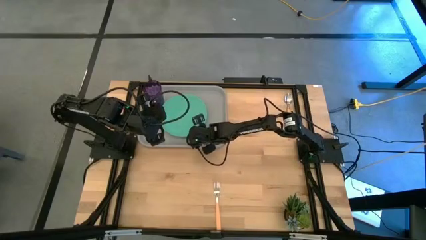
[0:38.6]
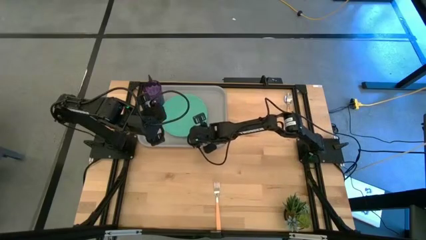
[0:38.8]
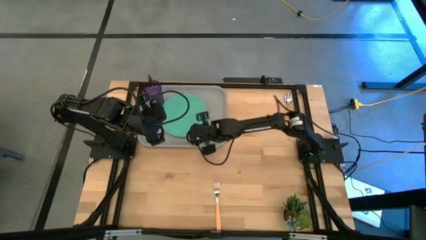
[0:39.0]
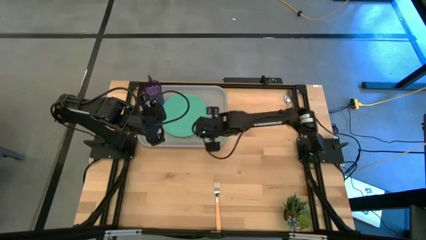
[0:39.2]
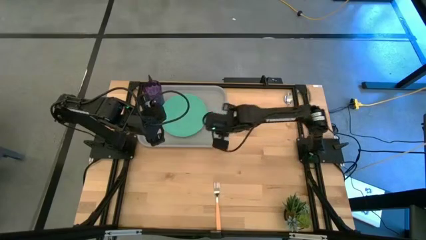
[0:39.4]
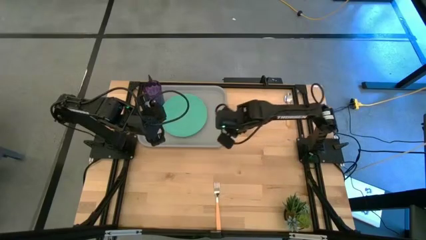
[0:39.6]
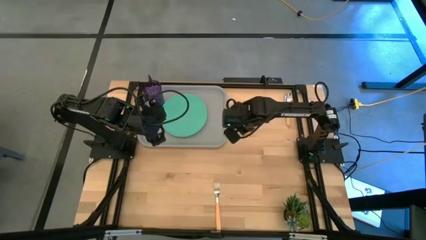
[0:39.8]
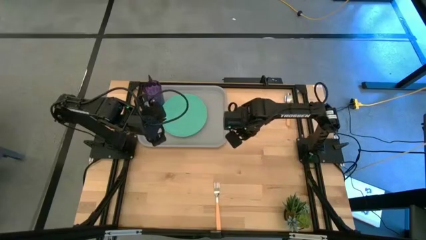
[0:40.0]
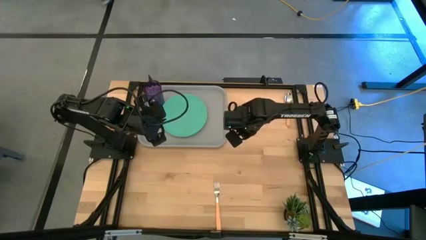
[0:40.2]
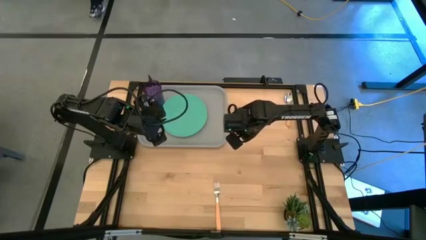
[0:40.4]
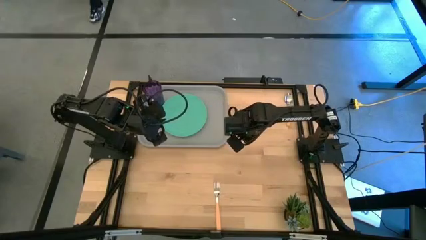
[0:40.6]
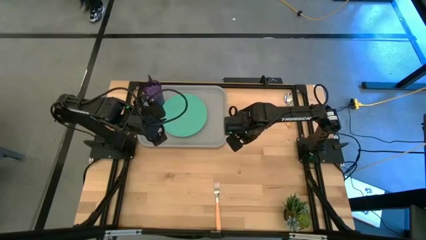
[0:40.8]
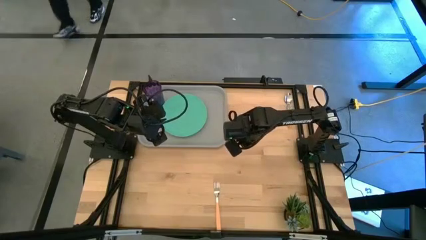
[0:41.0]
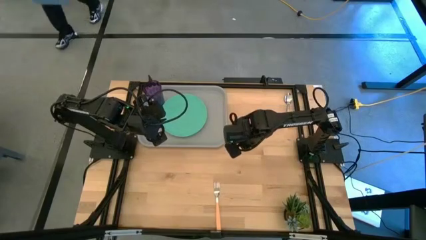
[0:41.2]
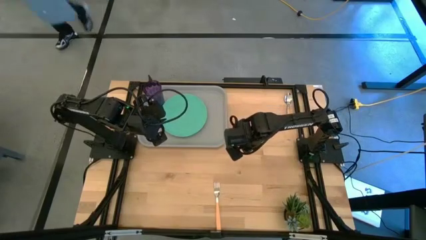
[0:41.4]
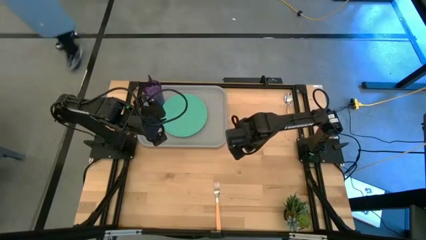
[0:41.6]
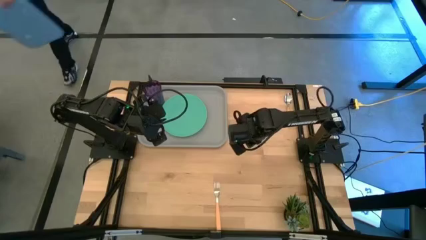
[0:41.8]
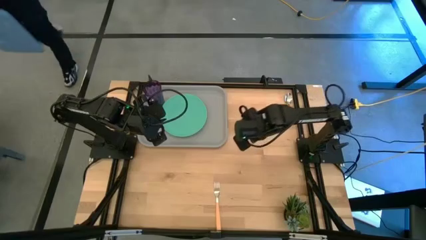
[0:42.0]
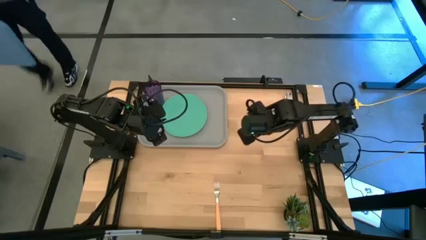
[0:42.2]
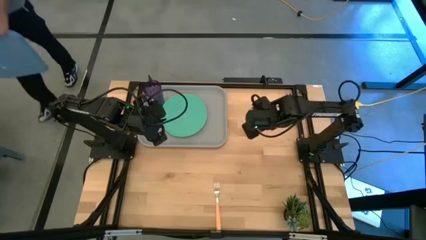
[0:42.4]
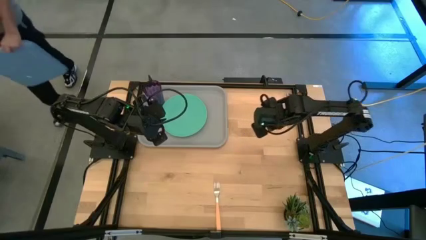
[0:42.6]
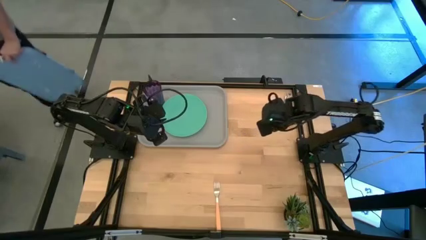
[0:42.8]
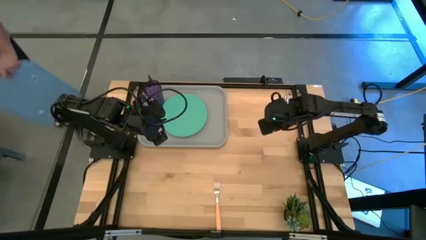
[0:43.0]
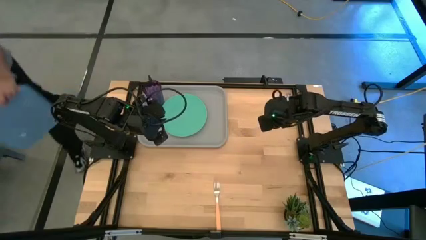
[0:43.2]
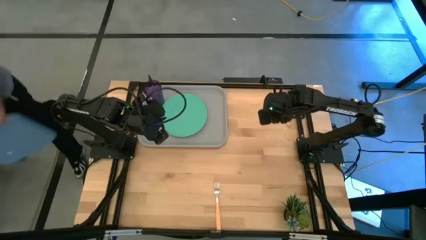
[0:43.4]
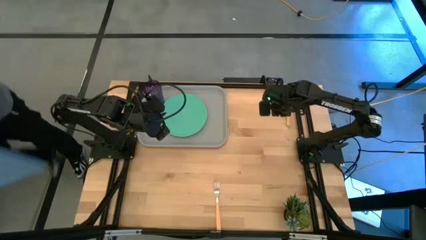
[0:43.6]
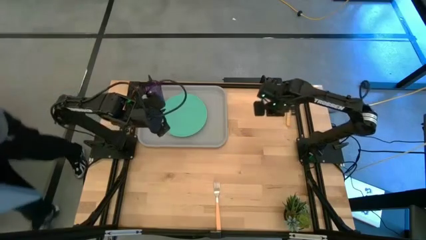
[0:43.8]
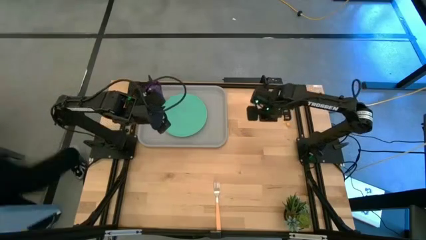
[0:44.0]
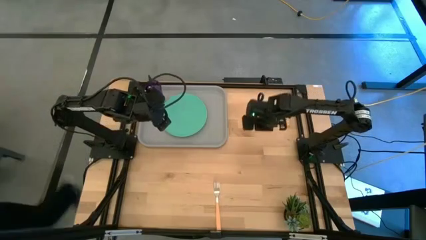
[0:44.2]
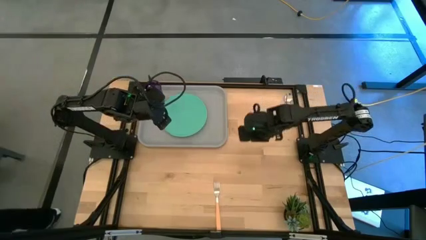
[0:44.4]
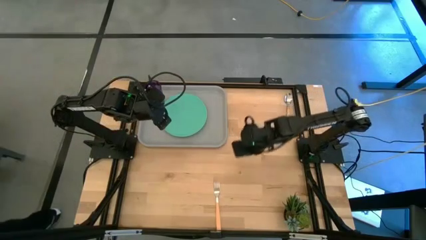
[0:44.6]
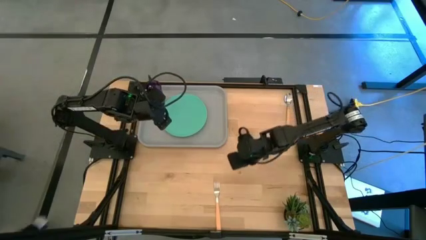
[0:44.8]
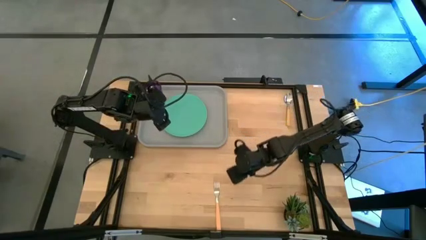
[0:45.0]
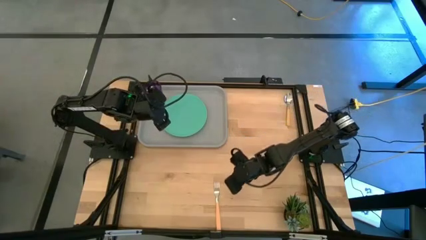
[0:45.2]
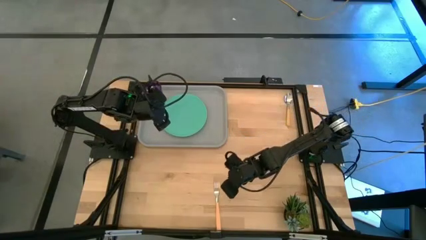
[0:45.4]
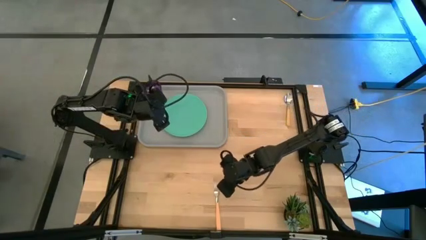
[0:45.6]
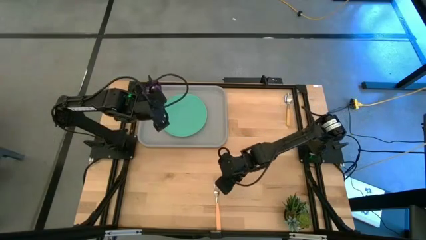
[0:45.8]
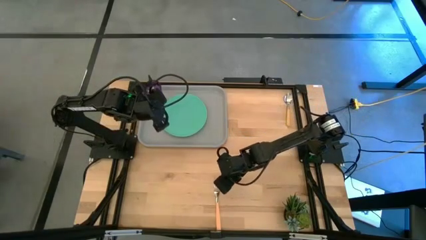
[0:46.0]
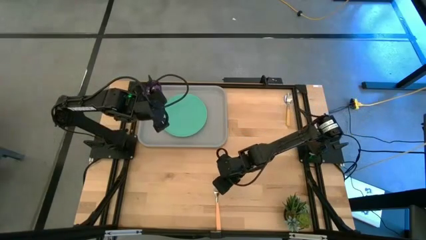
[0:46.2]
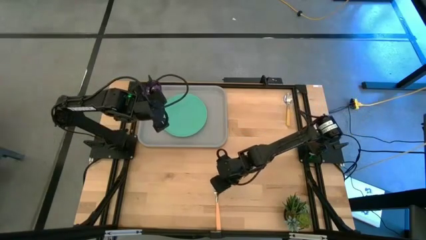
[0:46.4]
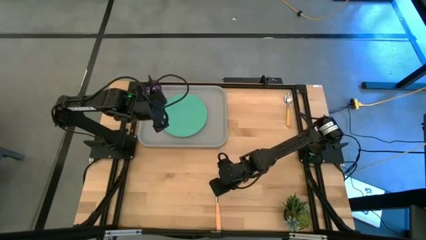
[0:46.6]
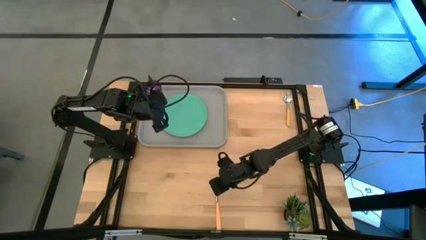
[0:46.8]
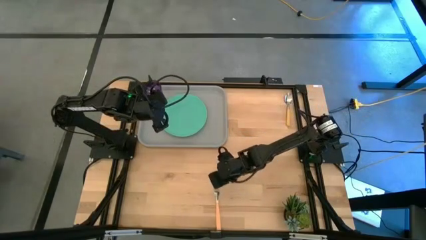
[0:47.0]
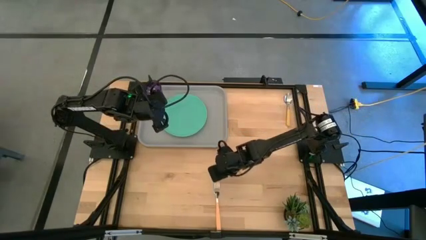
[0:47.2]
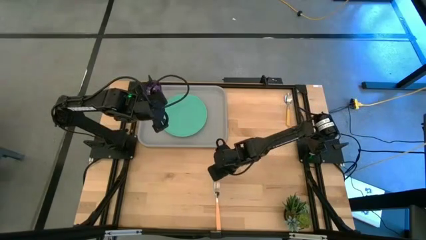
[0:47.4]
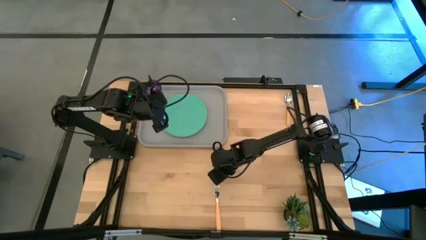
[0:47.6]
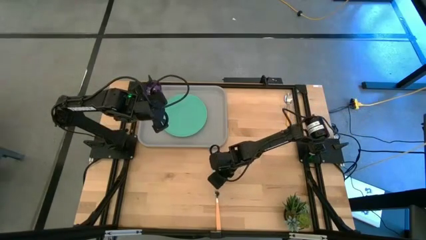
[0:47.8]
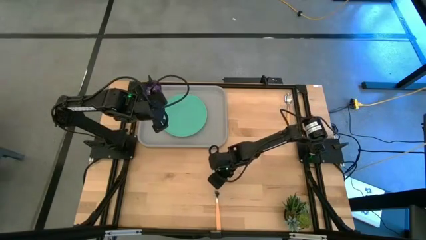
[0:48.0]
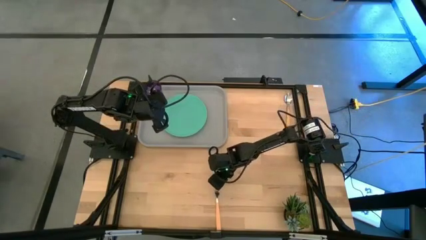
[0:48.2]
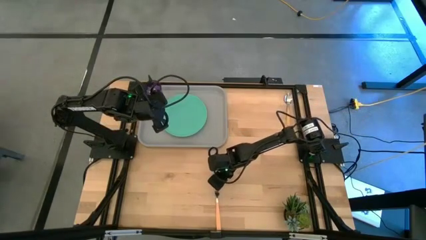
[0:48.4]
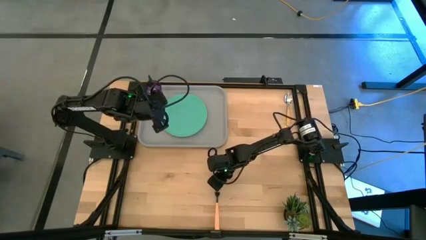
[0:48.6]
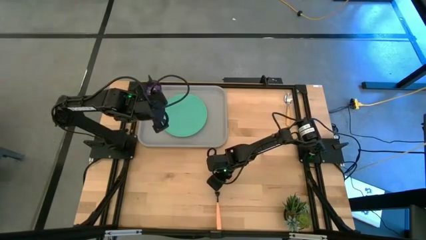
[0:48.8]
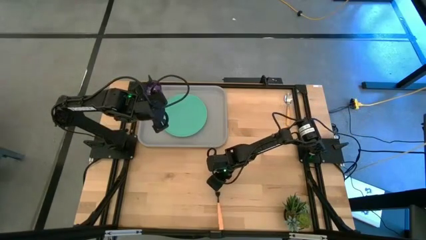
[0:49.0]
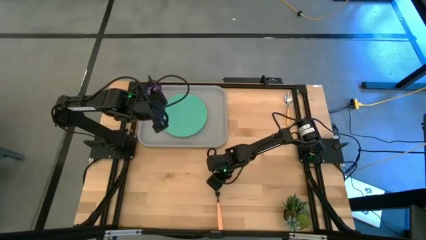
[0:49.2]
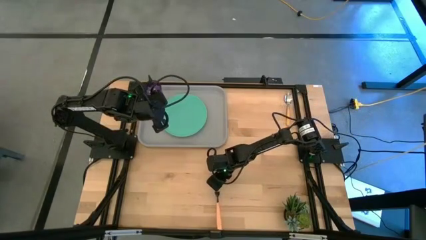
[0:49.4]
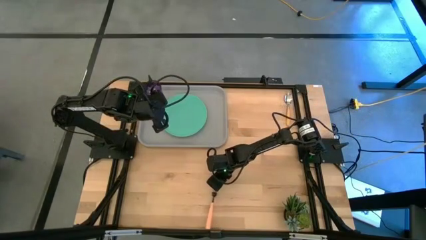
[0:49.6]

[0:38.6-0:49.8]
Task: Pick and place plate/cup/fork/spoon on tray
Put the orange fork on the right side of the green plate

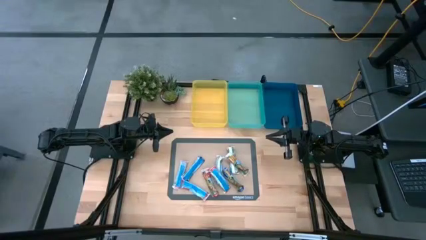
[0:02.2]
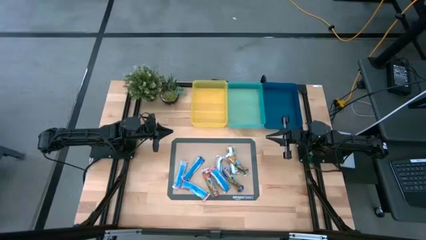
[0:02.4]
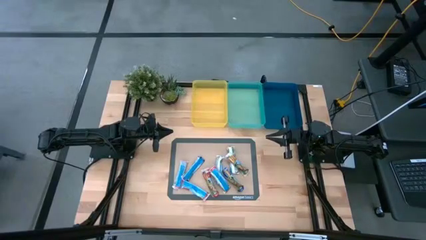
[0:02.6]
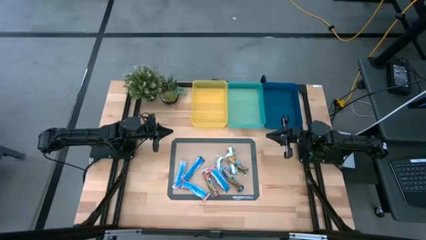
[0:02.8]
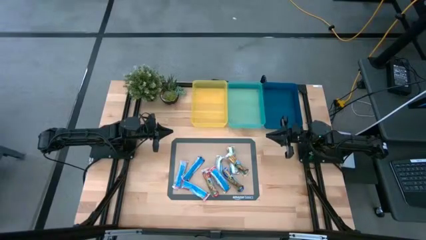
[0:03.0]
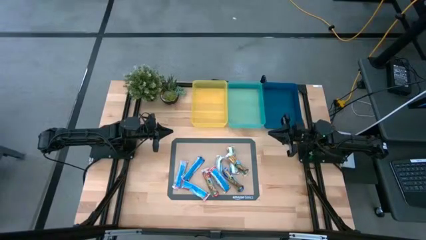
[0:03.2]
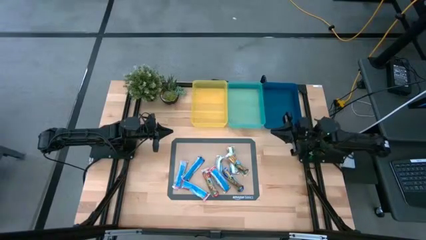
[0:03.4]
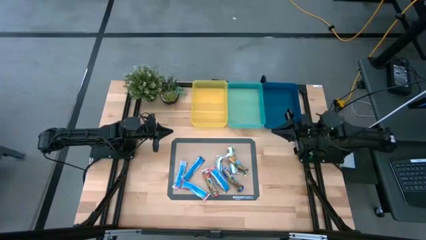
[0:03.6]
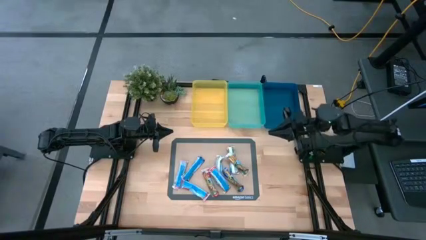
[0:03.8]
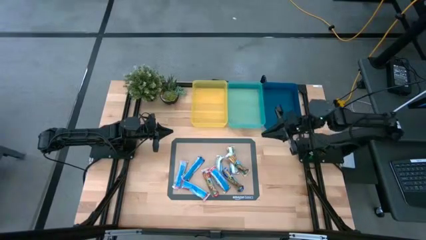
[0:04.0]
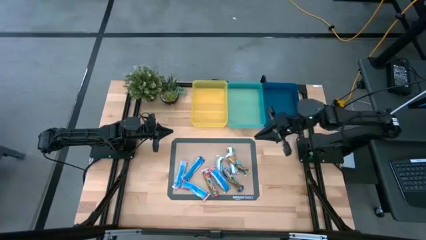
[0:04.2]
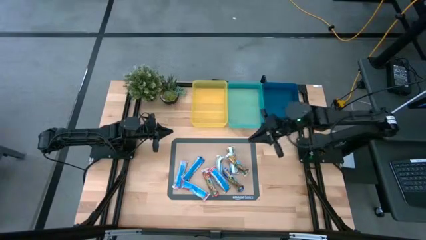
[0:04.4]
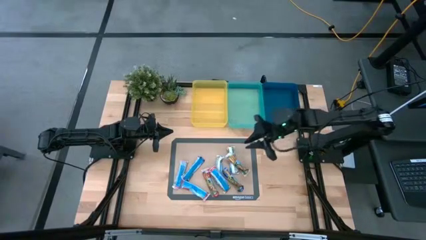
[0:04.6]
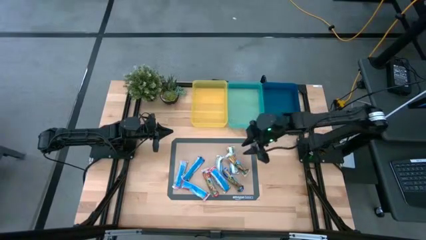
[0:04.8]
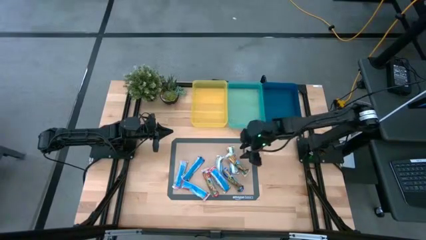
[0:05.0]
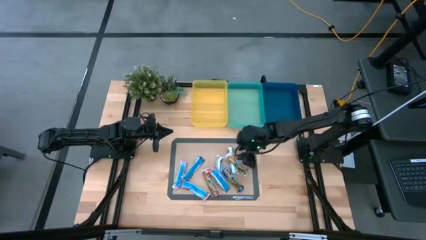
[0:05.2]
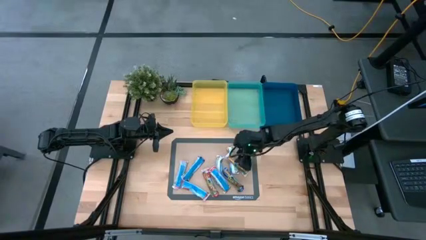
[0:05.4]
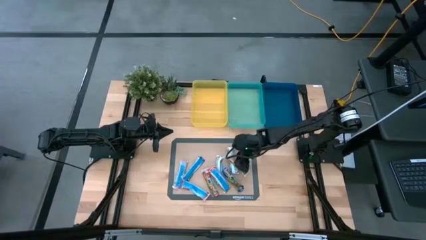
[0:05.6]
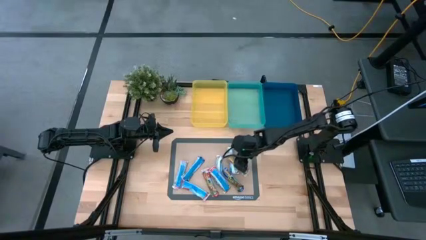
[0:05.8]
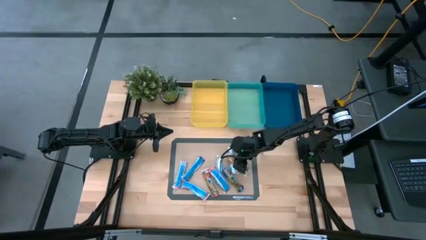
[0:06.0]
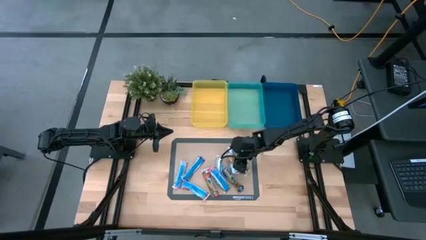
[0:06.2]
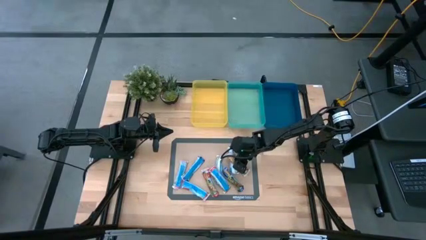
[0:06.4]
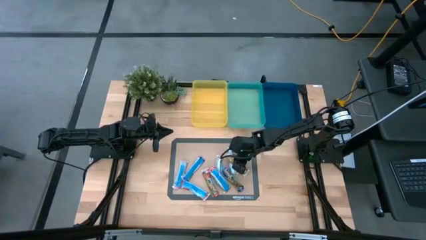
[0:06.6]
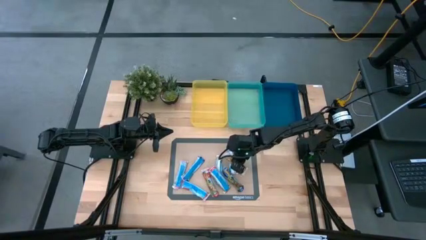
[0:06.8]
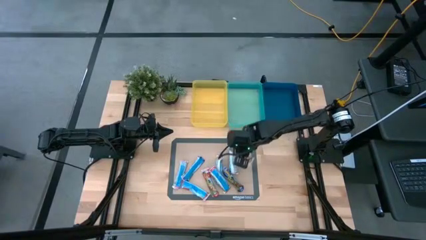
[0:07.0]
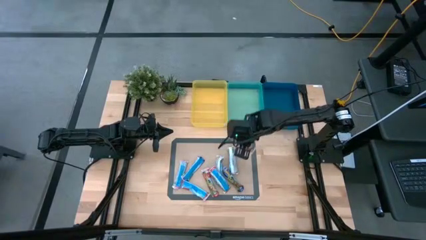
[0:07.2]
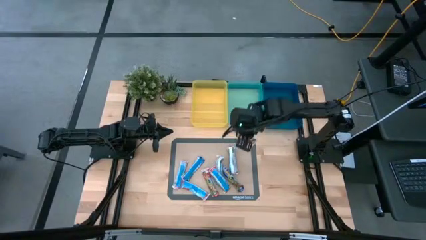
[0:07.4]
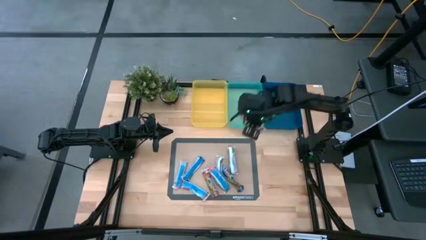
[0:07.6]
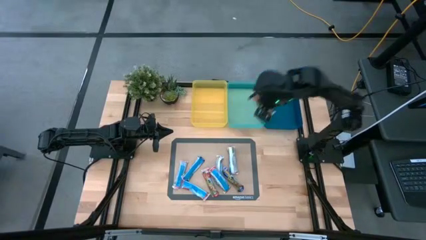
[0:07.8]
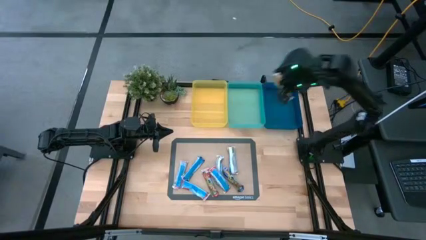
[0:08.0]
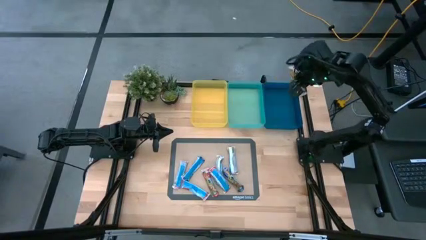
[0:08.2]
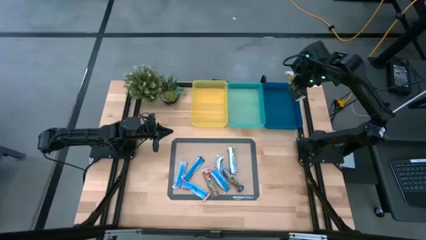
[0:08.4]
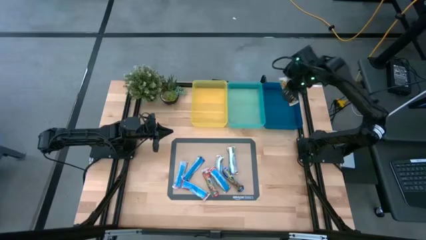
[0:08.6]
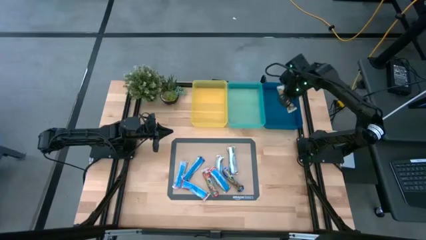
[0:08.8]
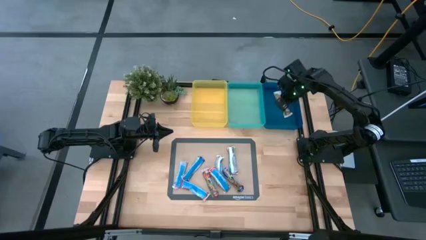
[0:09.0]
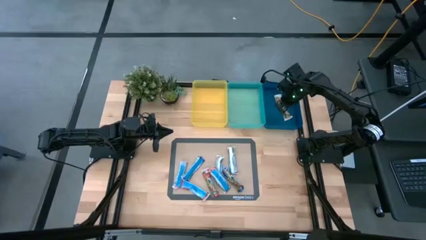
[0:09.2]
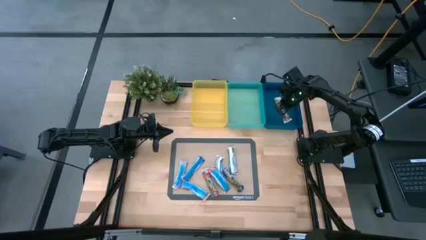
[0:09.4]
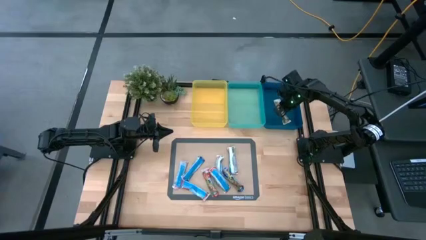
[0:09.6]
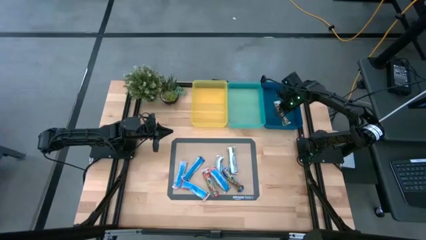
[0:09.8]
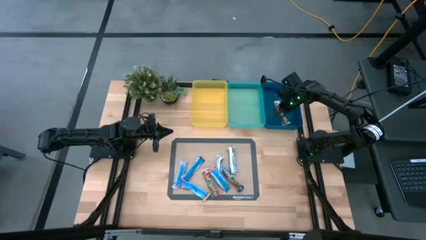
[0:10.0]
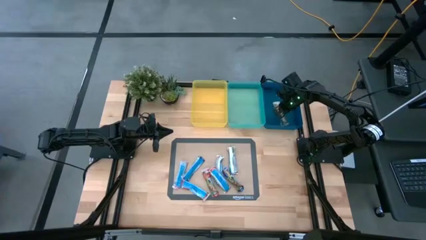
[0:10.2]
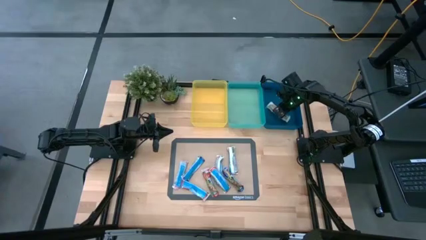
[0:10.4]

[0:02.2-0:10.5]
Task: Pick and place Granola Bars by type
Put the yellow granola bar into blue bin
